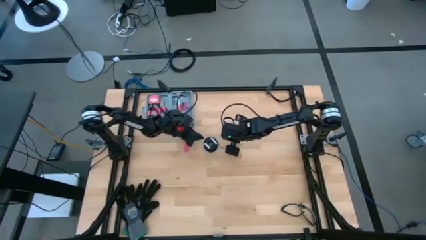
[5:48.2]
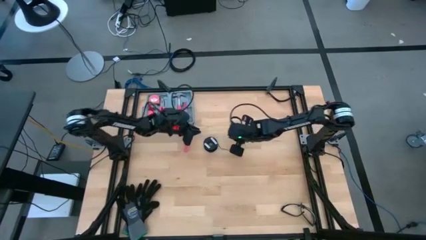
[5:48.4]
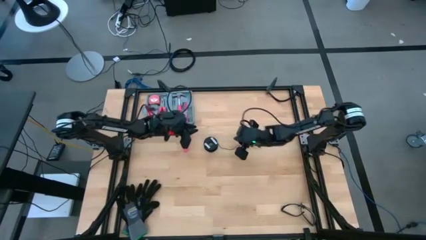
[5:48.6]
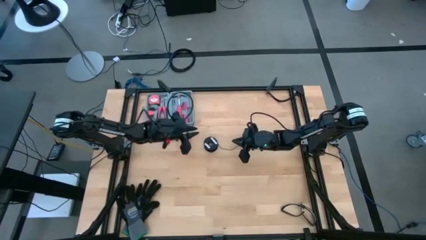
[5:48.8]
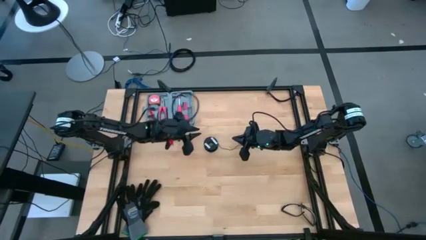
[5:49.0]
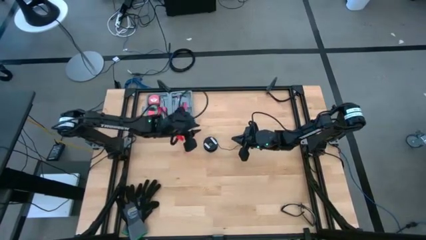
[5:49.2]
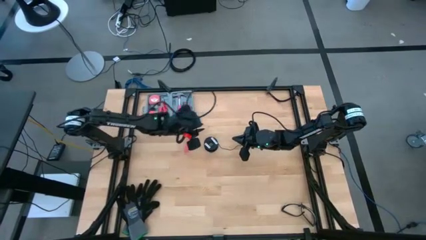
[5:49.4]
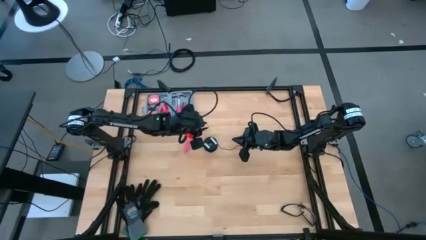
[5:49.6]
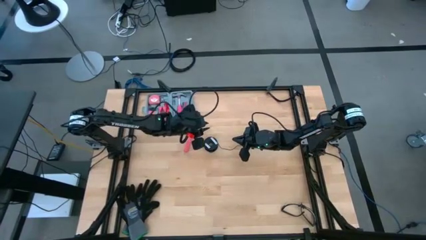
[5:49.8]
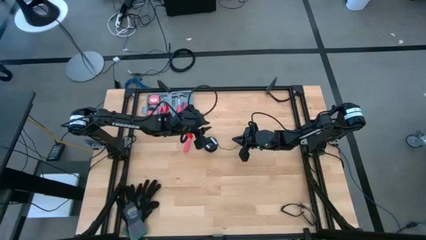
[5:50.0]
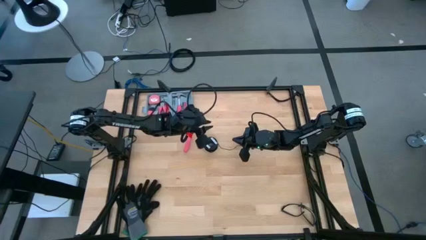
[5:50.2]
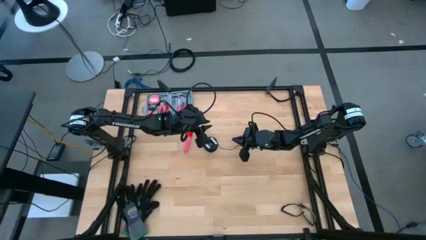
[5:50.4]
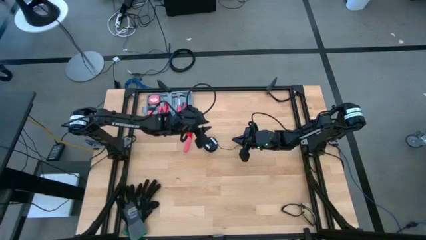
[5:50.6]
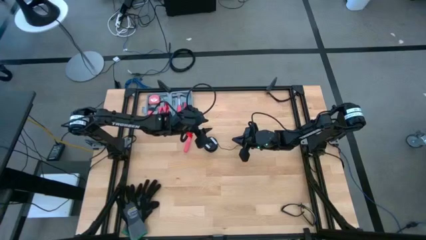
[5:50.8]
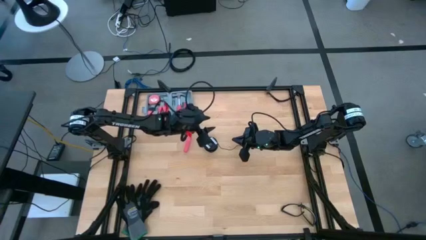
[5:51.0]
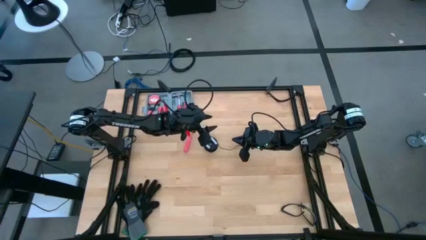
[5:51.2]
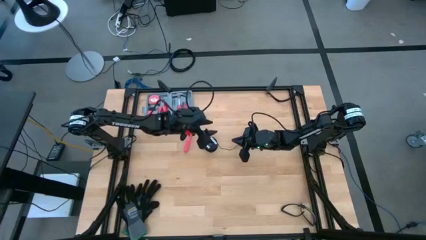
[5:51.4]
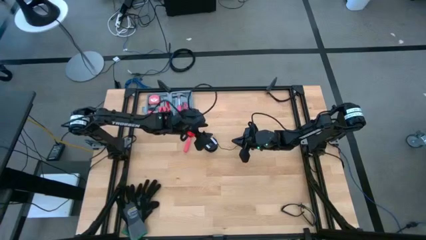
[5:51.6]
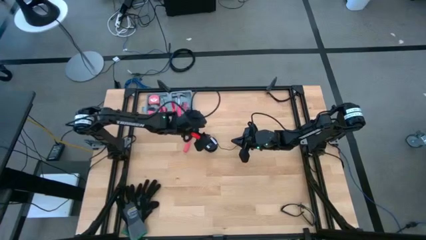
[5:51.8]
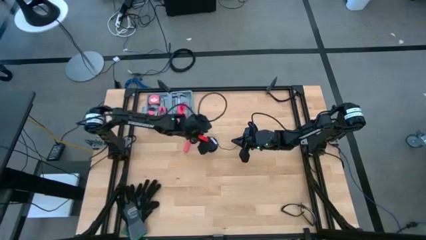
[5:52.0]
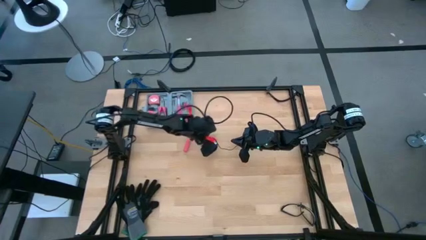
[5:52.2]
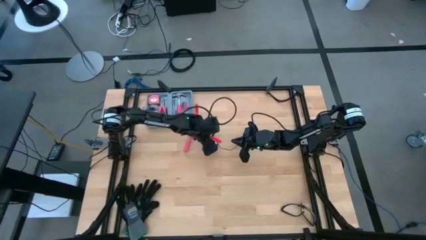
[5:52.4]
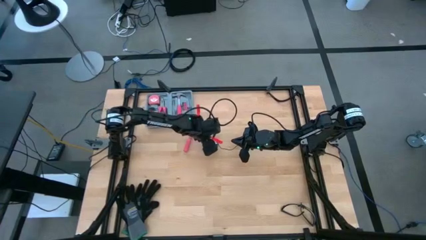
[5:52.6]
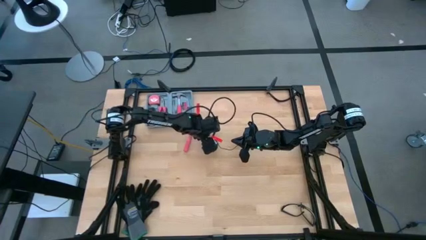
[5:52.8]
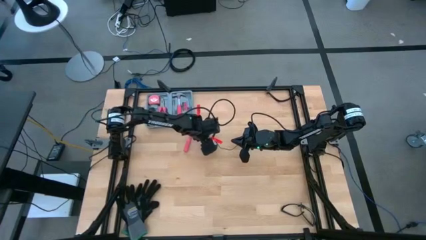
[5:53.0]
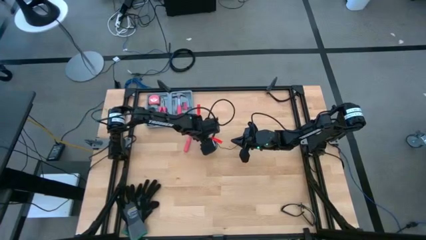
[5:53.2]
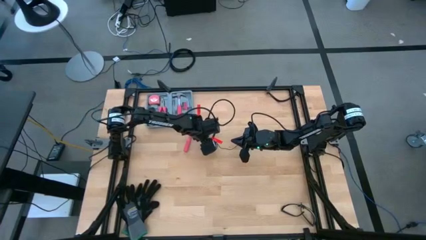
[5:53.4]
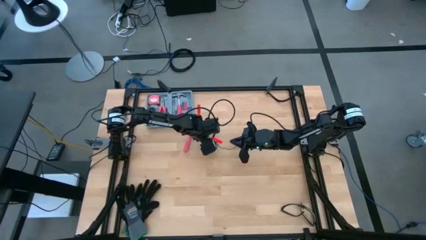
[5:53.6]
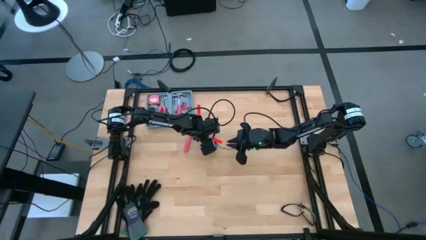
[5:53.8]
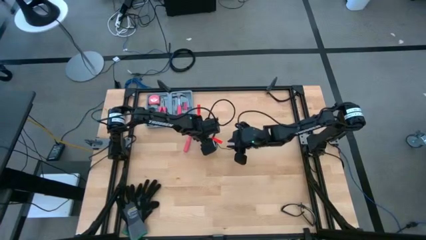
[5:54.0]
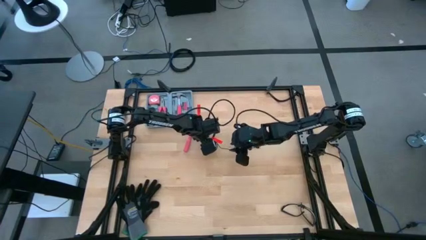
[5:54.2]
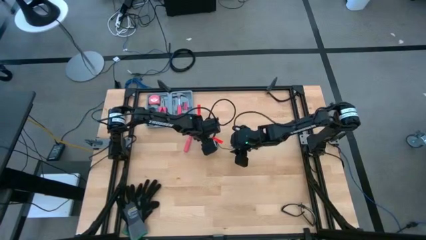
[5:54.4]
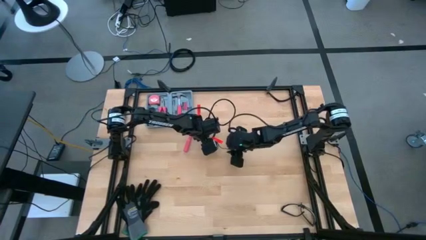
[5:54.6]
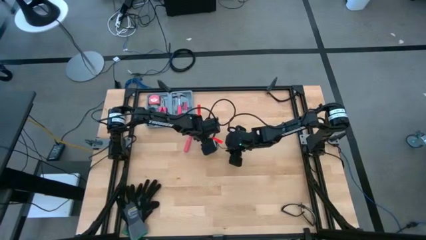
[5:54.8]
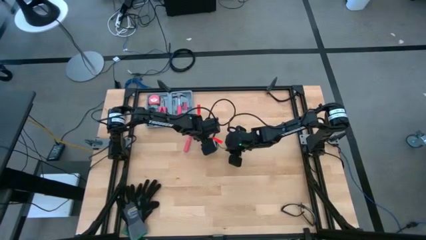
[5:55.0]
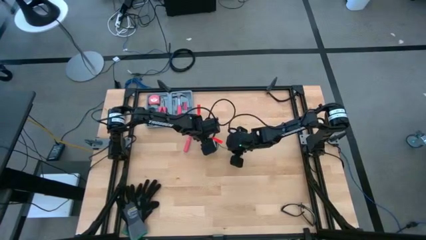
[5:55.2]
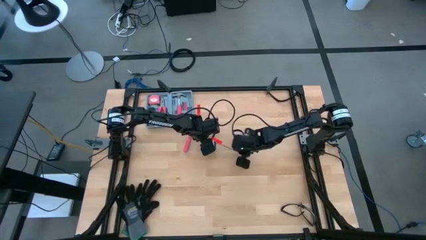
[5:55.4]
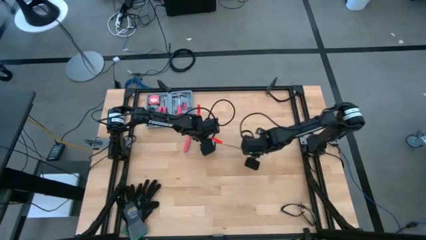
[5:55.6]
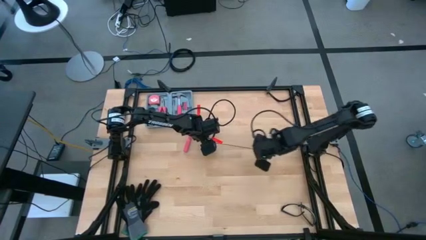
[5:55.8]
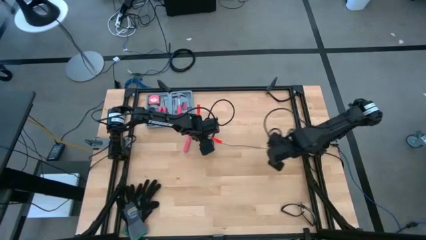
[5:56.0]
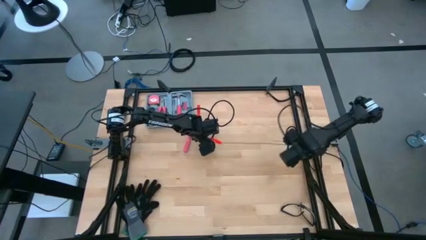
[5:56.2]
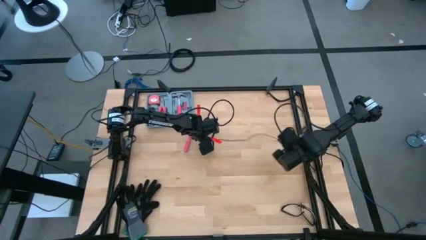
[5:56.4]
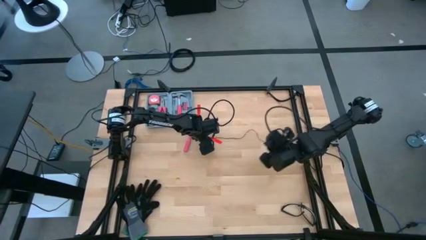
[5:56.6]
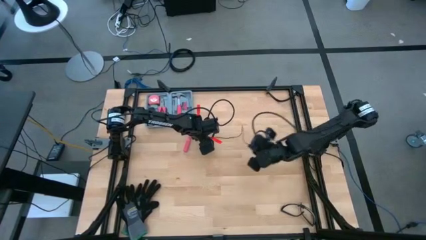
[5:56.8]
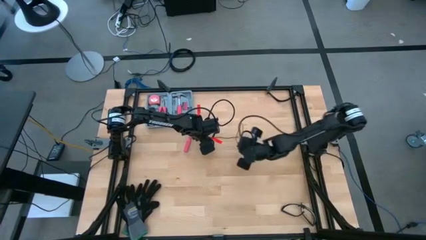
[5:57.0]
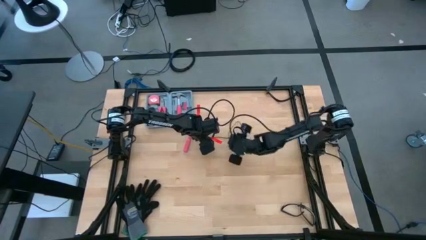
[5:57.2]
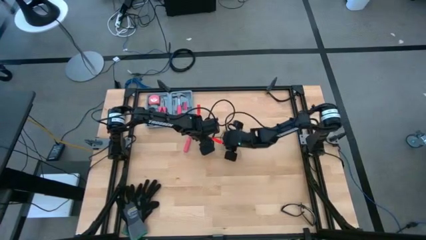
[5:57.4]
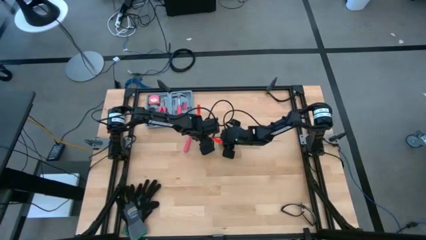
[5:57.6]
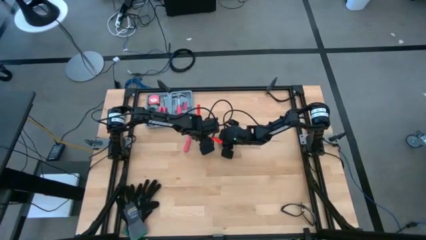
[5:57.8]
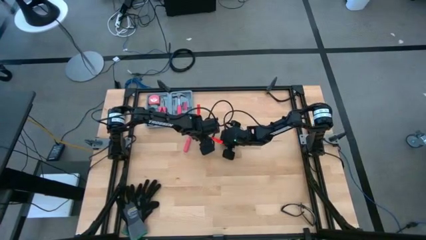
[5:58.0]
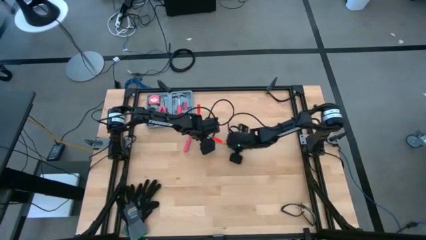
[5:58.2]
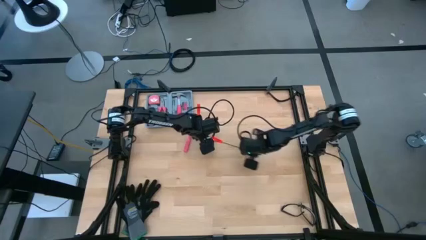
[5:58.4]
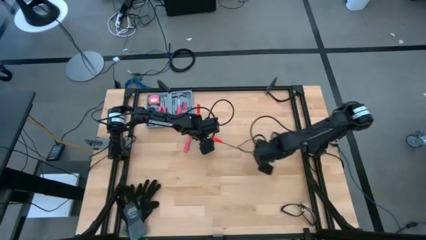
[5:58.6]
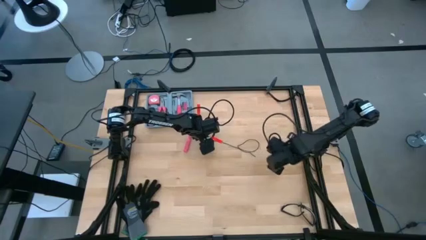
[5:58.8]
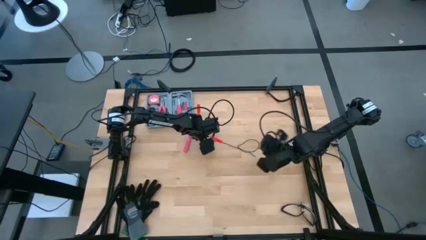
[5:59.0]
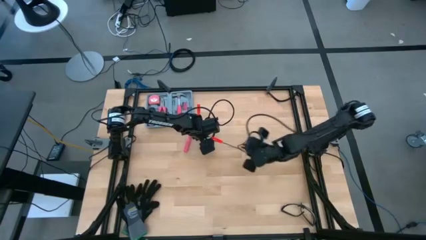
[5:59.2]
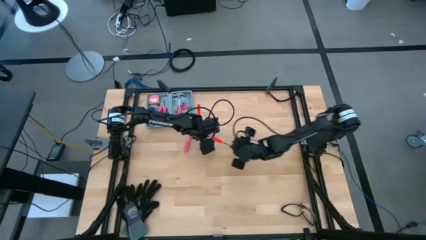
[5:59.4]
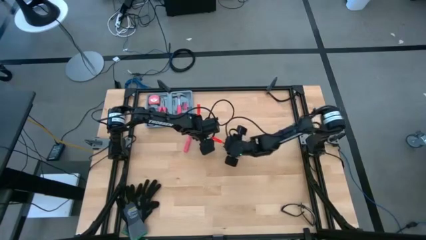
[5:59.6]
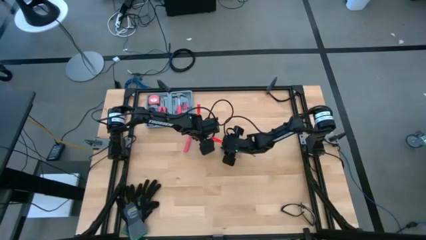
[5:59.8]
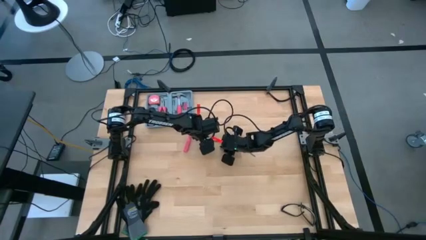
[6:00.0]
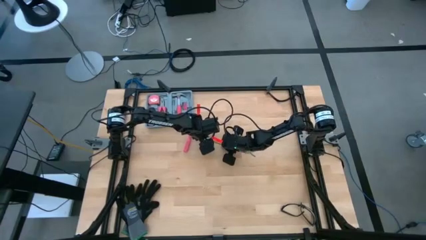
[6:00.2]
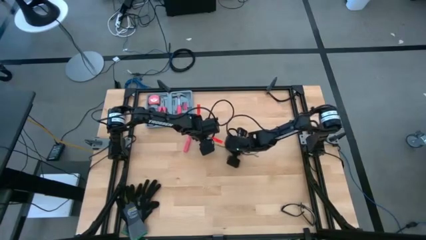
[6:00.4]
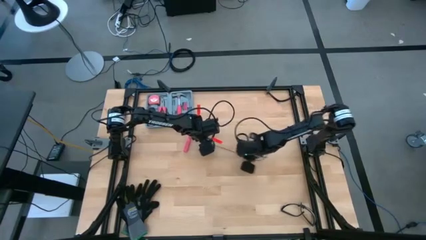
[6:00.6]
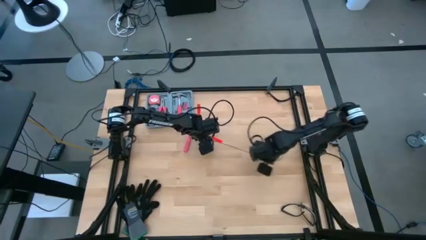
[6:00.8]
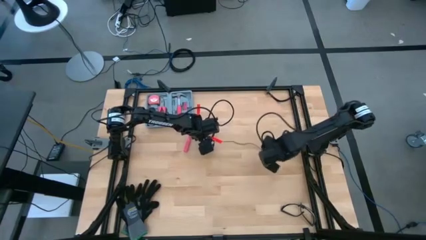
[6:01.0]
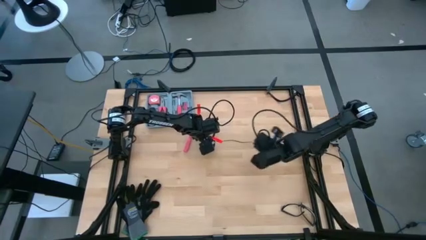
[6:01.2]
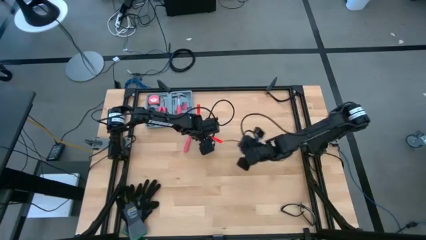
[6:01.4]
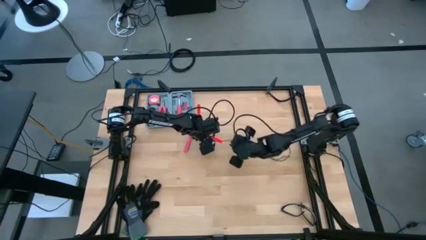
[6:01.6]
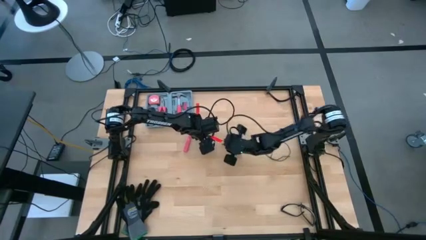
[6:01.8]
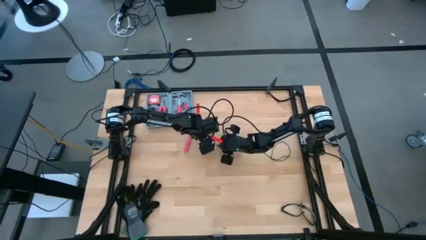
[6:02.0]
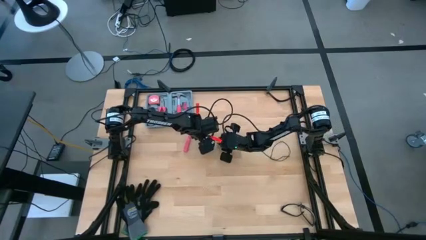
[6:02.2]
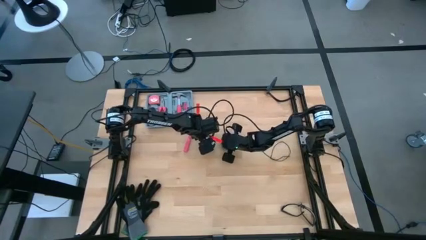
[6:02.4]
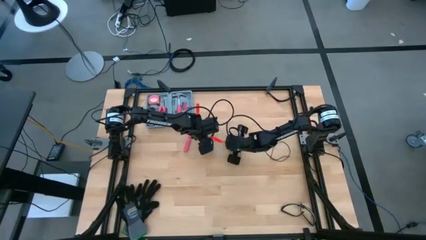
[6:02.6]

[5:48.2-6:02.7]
Task: Coil cords
Uncoil the black wire from the spool

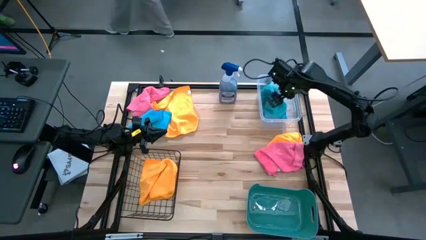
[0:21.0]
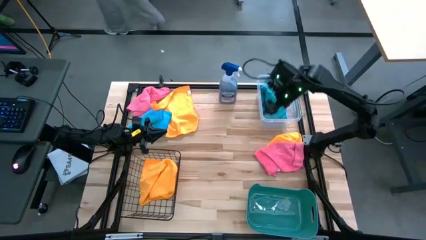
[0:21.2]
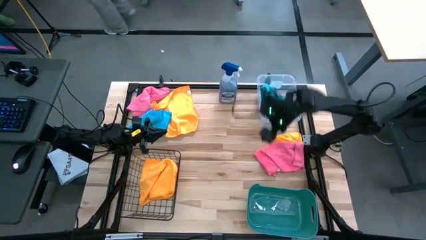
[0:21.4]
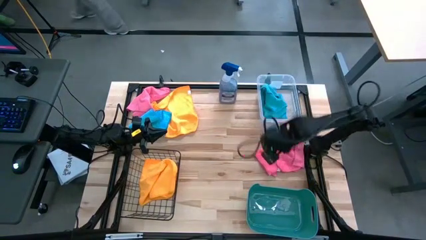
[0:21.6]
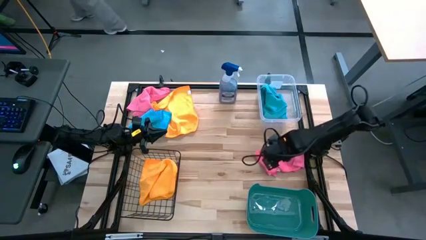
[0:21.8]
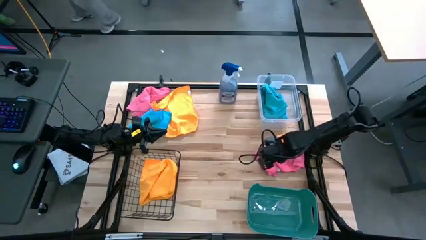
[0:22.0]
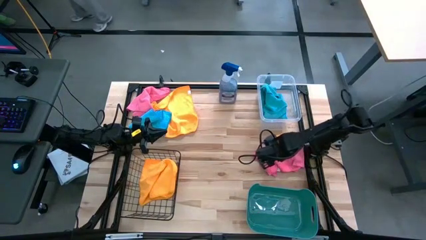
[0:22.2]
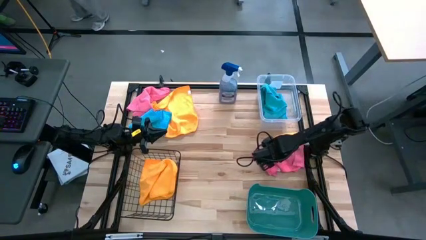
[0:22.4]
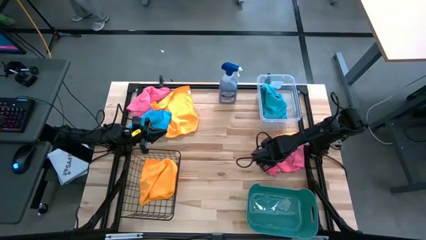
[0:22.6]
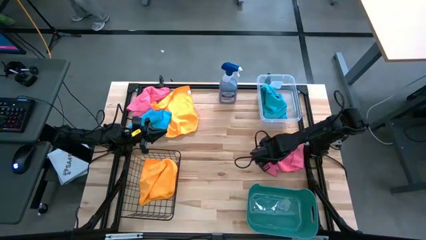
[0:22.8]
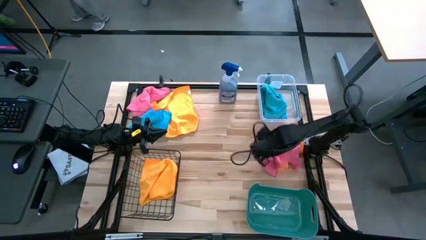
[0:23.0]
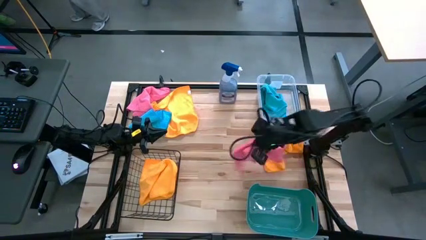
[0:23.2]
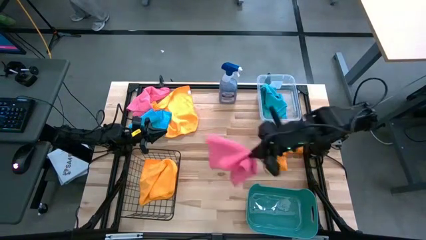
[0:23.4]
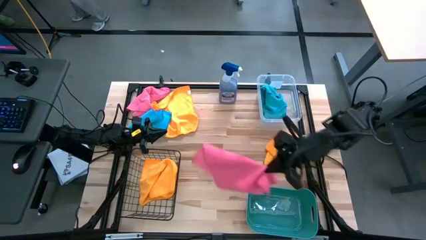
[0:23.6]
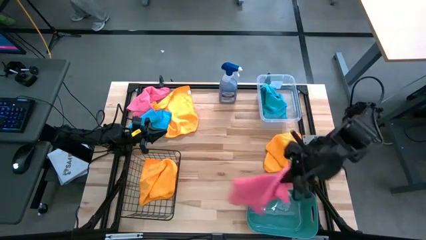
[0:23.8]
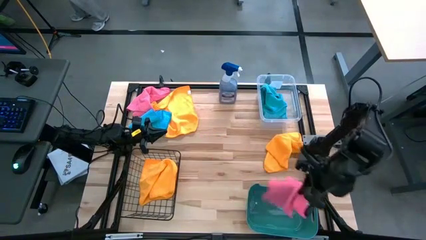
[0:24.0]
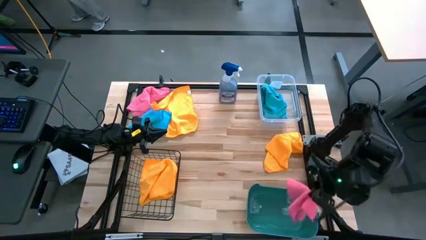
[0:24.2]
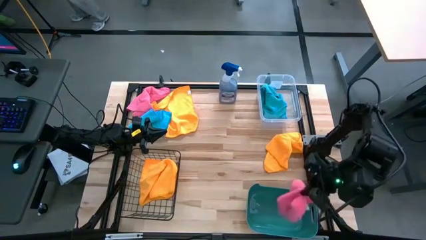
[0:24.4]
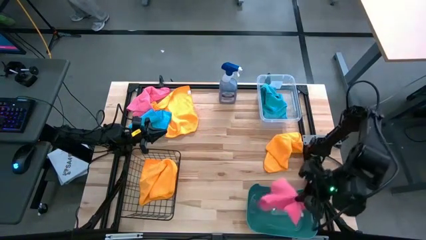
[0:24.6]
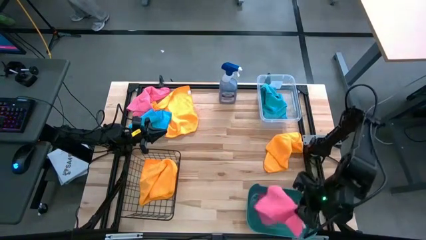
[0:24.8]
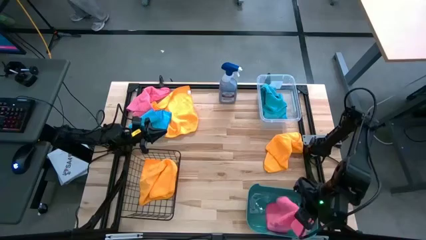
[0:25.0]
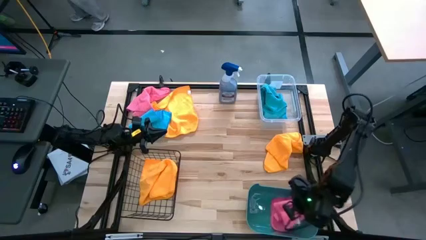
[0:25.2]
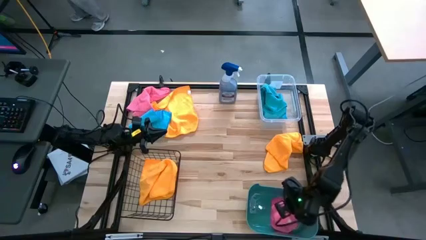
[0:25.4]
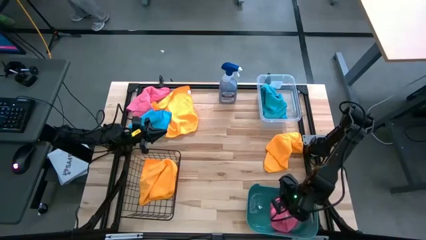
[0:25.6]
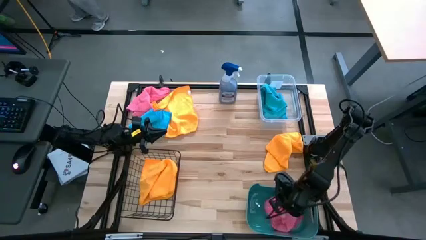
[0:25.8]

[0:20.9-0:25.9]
Task: Sort microfiber towel by color & place in baskets
Put the right pink microfiber towel into the green bin
